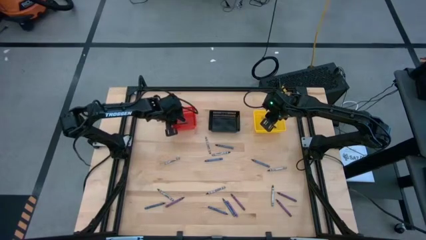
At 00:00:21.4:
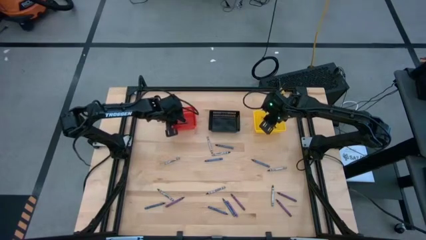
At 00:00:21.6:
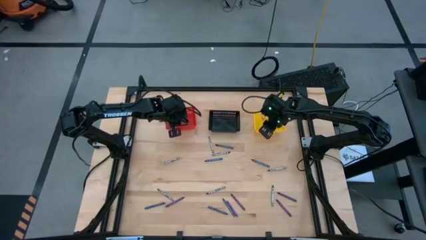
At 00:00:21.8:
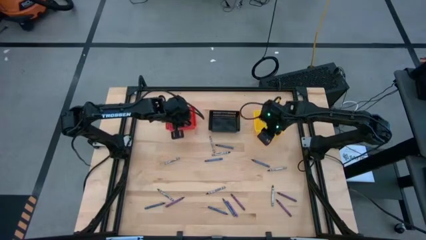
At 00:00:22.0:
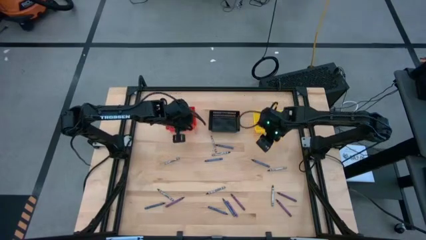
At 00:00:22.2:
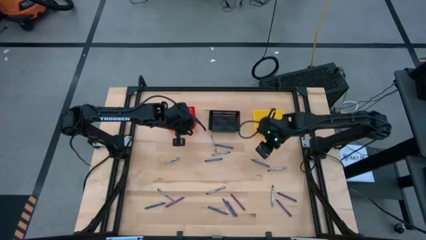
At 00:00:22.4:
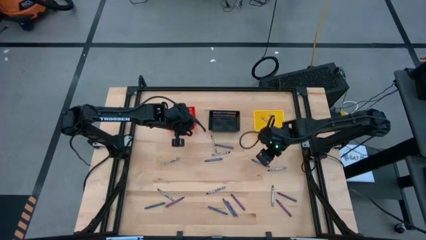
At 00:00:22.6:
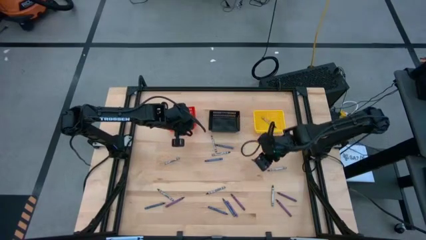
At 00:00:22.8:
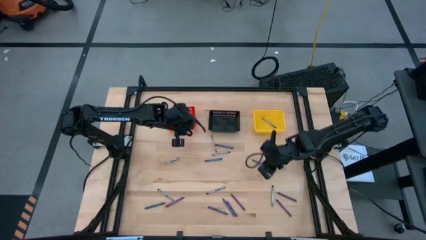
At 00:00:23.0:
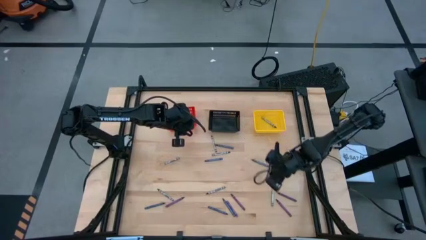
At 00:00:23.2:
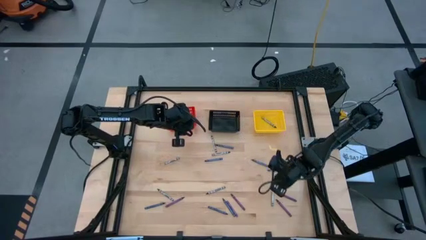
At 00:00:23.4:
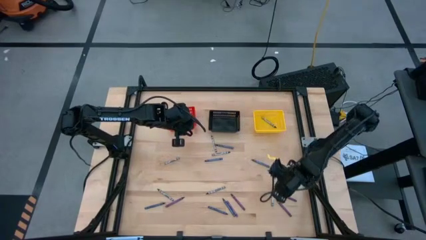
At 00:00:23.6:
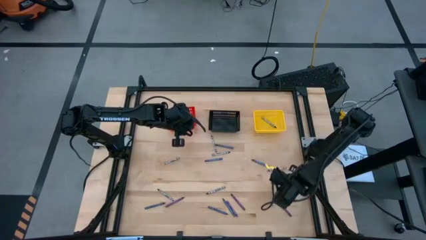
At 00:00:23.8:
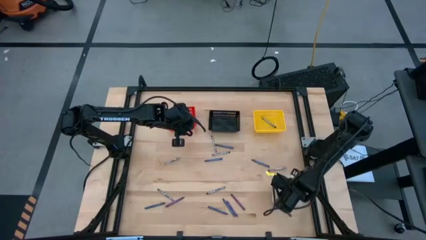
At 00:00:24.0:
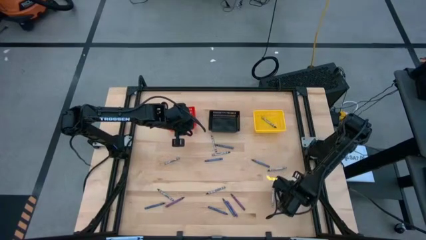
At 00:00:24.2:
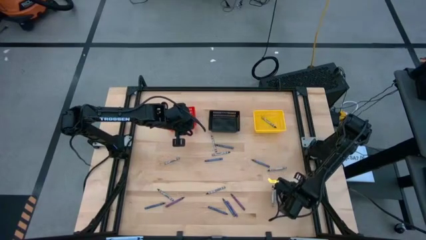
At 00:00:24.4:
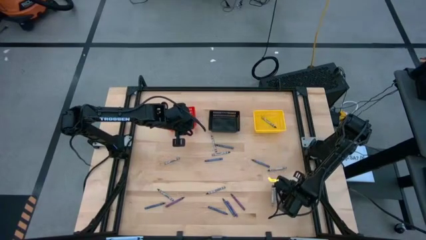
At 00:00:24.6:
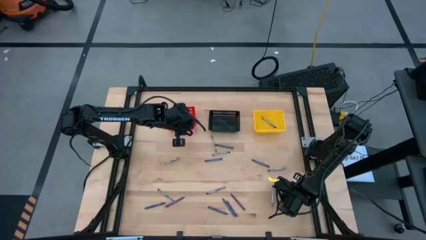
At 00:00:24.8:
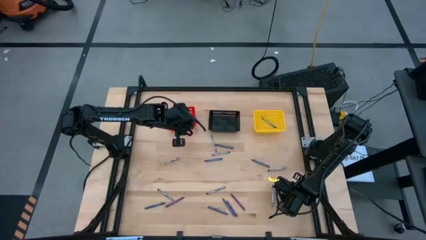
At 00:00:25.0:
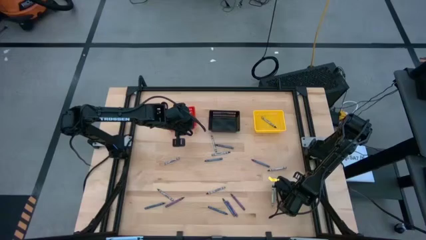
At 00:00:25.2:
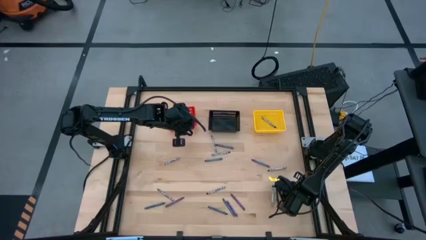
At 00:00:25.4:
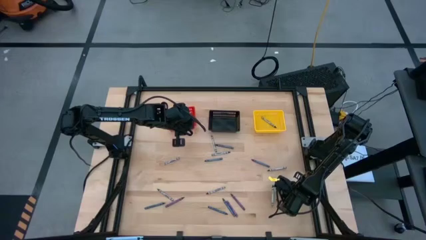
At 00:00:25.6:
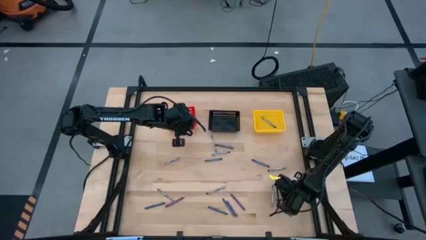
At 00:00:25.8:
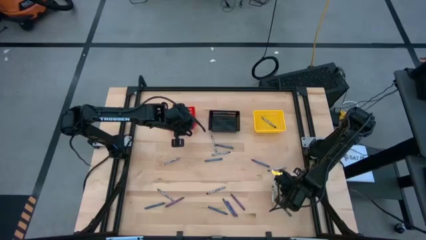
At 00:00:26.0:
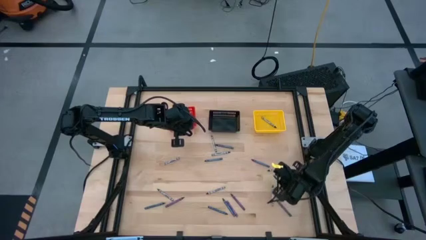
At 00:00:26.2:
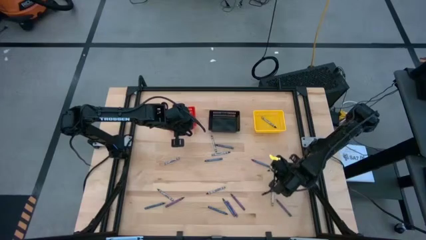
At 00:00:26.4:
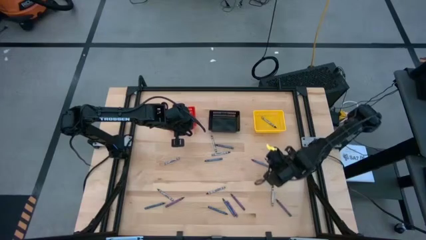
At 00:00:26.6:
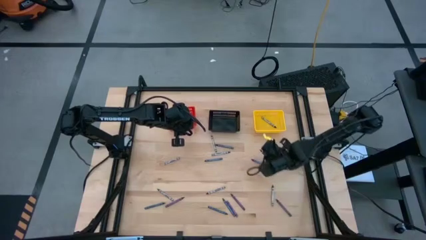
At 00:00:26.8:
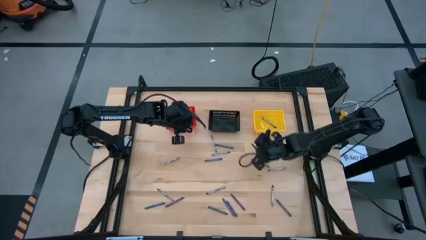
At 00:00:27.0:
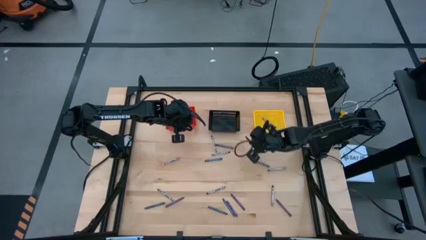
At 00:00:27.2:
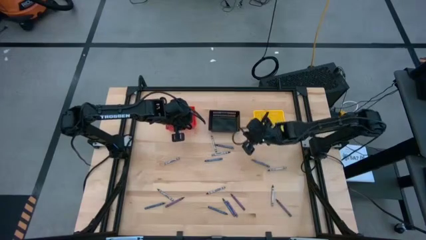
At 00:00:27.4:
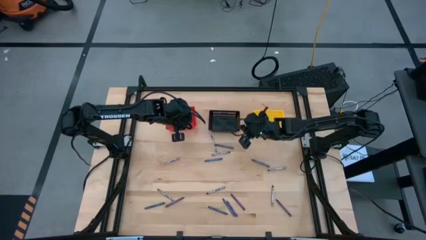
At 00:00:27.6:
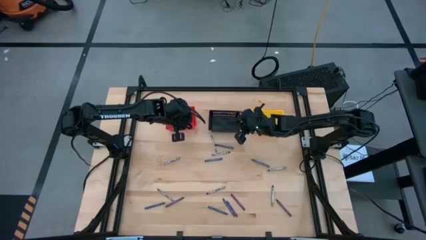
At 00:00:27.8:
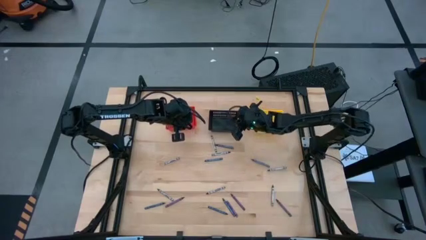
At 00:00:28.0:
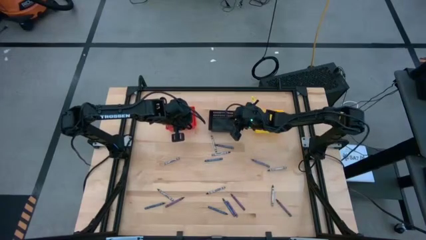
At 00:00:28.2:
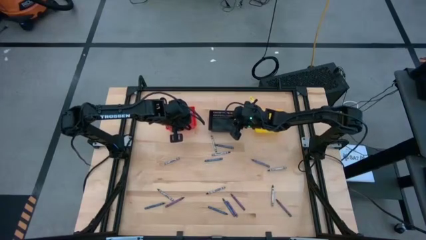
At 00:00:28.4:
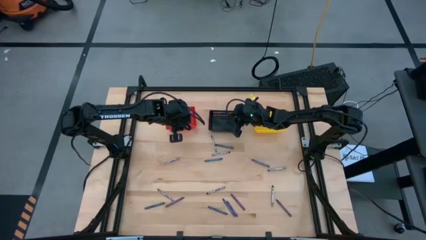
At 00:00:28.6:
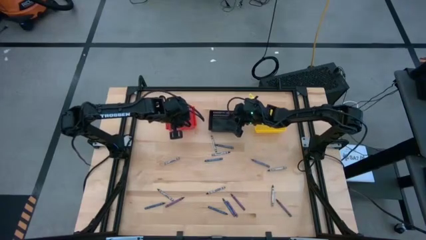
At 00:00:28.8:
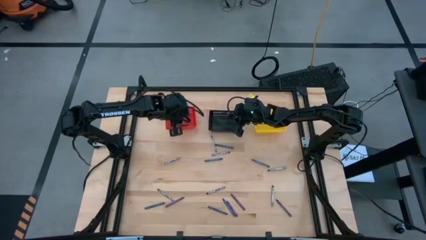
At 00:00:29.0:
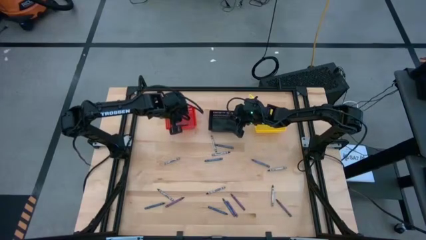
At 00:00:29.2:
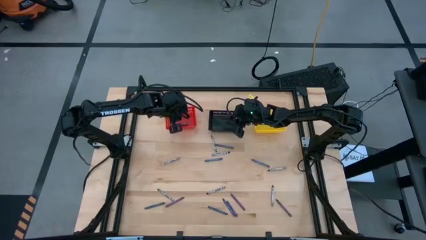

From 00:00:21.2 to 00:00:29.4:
Task: Sort crayons
Put the violet crayon into the black bin

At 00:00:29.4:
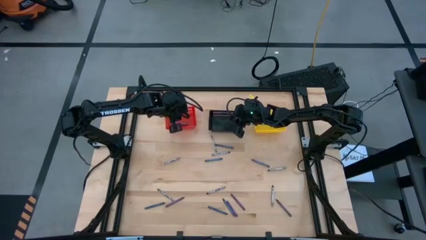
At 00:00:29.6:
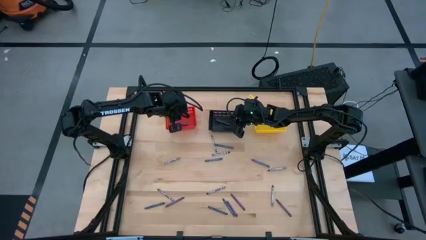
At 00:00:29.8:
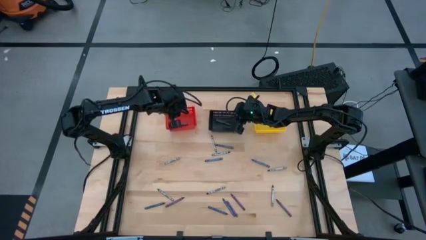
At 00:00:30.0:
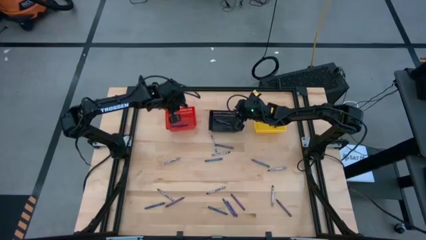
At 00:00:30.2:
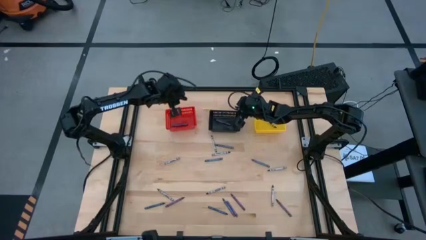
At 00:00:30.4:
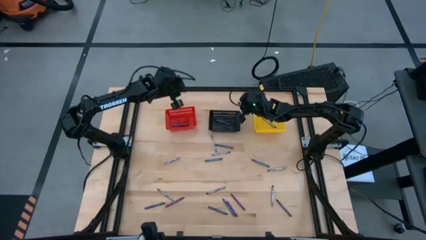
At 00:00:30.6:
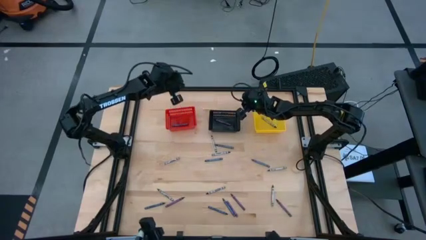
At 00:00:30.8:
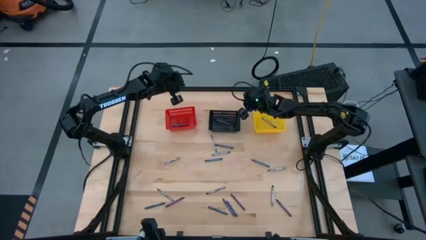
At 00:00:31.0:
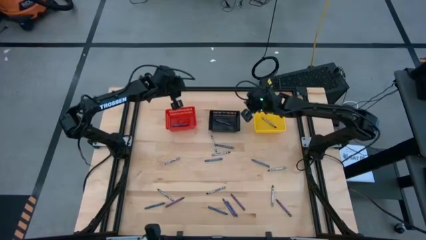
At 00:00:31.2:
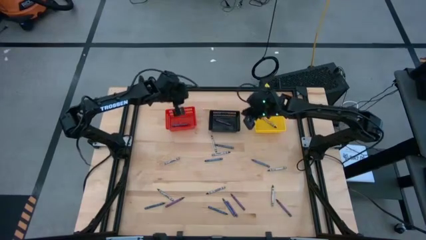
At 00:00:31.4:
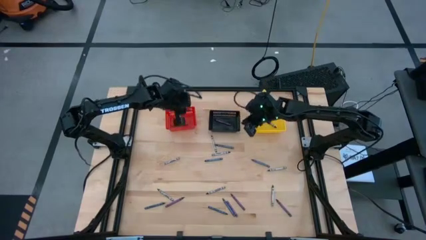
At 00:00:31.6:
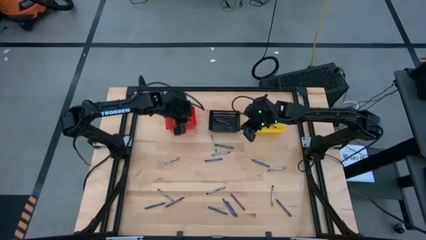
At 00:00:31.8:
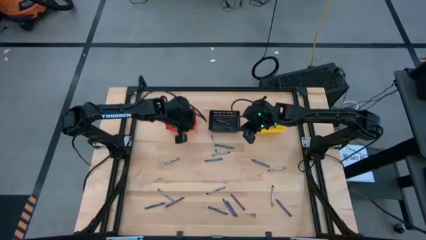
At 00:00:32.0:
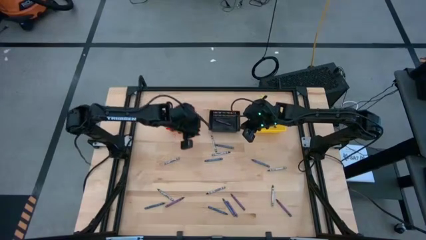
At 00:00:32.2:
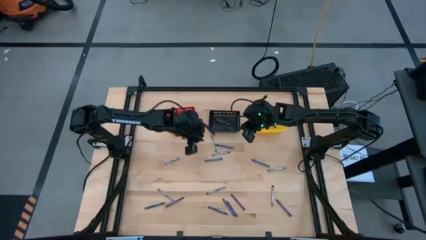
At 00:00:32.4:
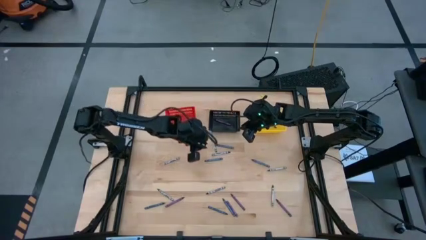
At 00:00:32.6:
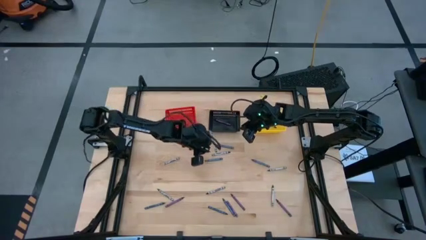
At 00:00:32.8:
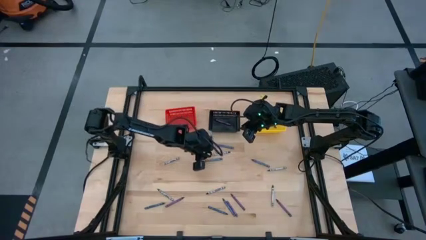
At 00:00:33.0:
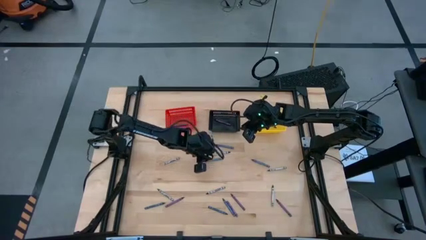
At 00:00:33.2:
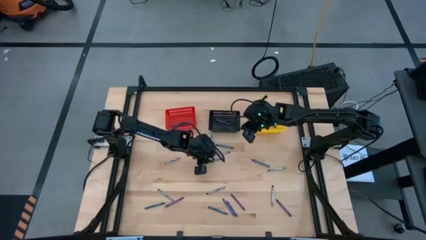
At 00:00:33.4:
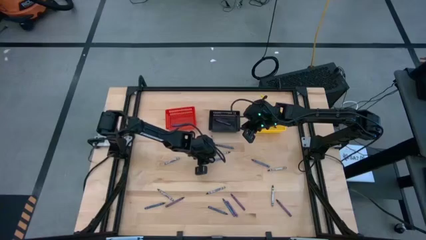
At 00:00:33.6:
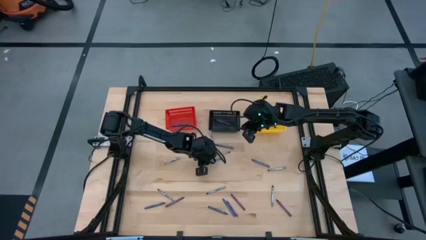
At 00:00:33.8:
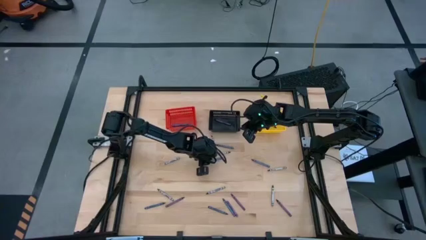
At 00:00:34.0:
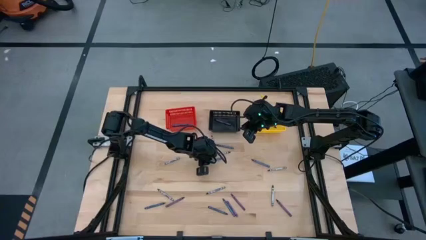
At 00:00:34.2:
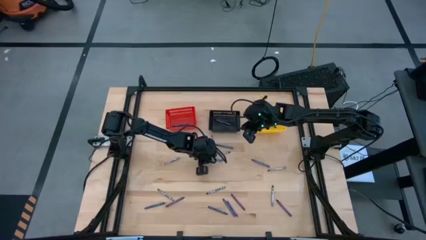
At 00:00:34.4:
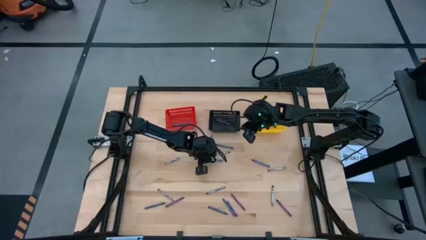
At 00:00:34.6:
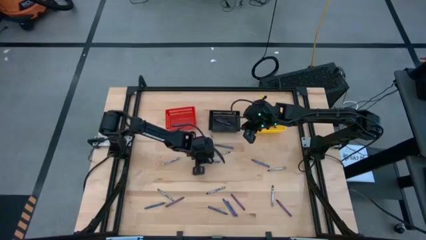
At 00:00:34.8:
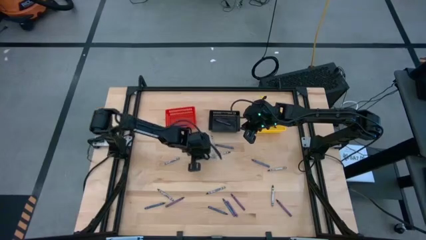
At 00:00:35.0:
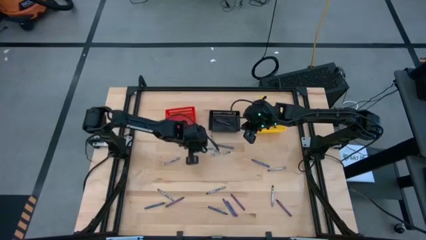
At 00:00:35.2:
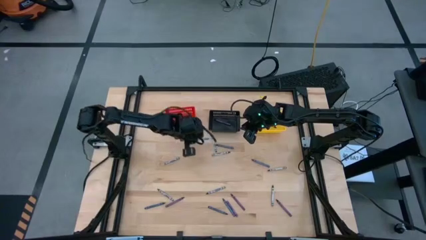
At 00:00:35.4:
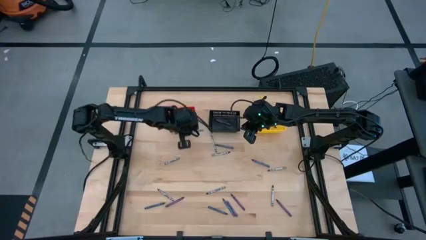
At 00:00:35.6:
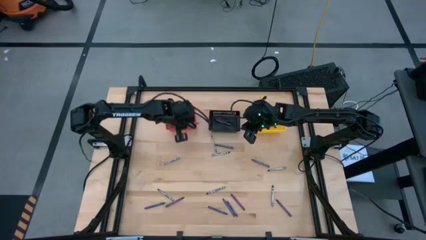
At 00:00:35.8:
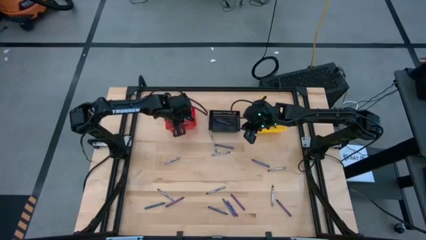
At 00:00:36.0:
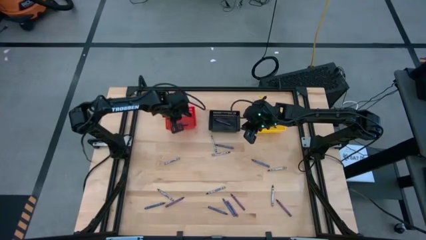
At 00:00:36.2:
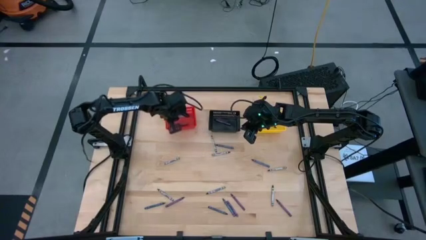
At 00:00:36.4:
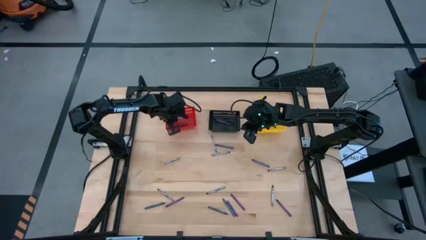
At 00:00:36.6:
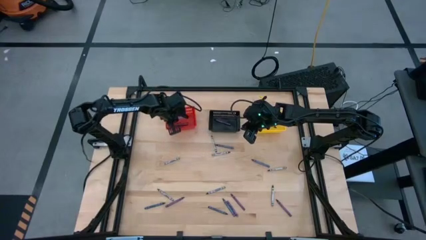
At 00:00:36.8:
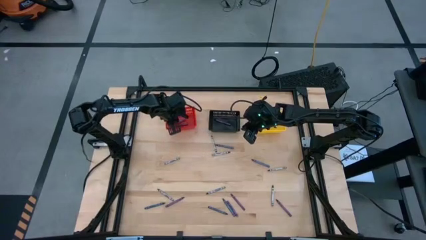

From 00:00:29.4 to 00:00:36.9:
Put the blue crayon into the red bin
